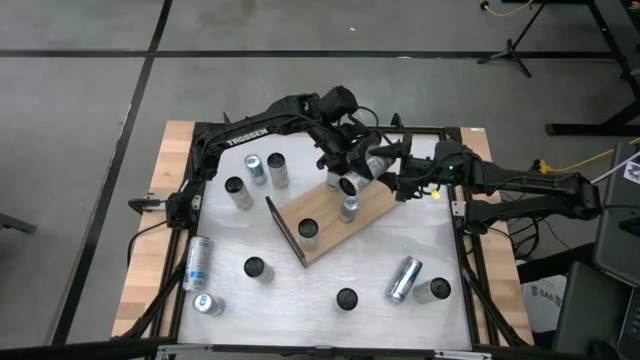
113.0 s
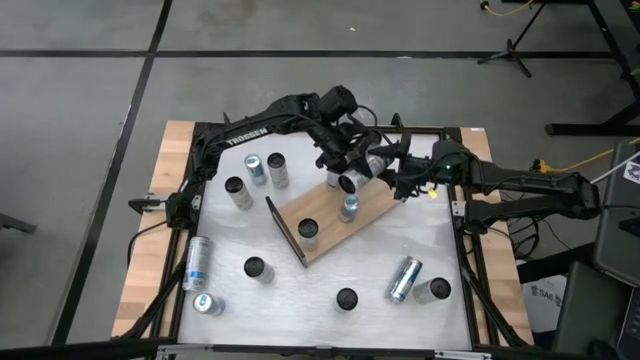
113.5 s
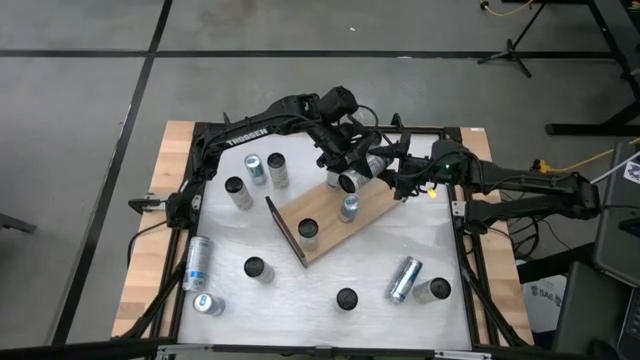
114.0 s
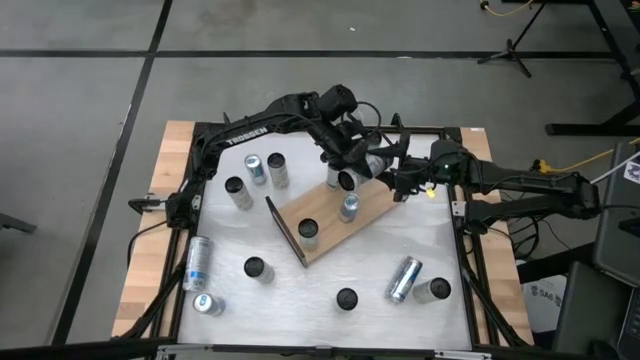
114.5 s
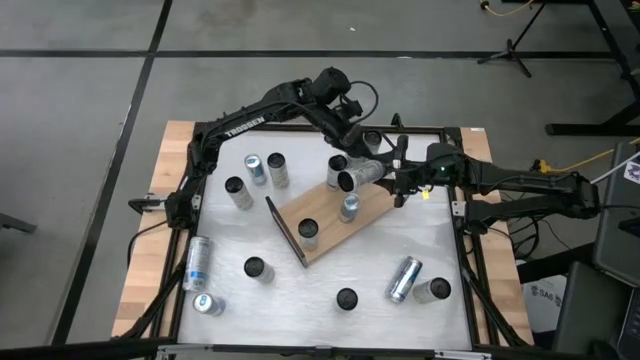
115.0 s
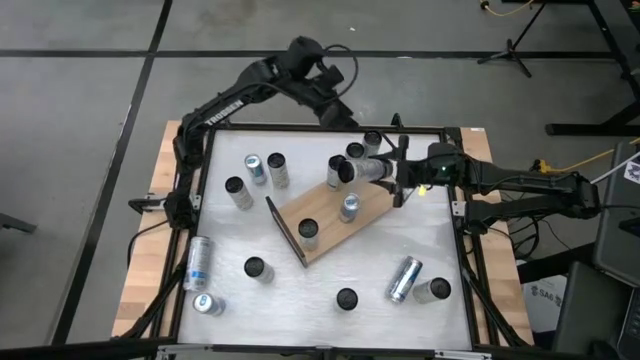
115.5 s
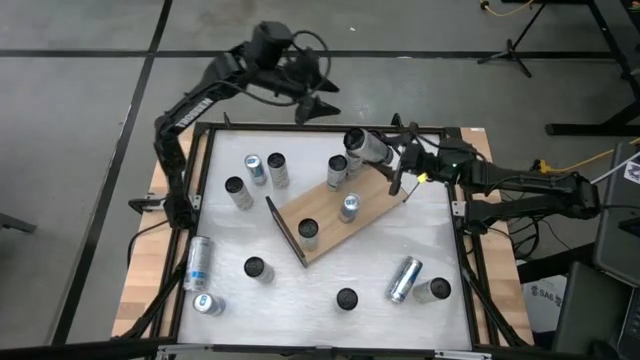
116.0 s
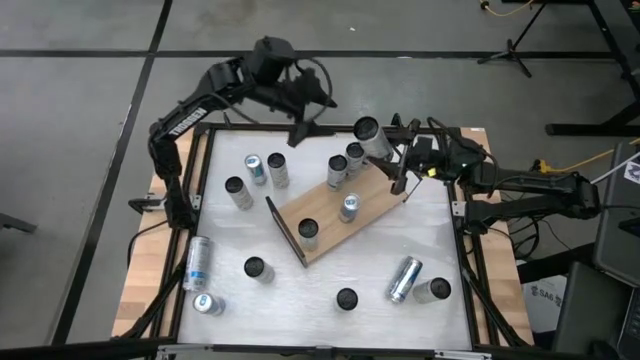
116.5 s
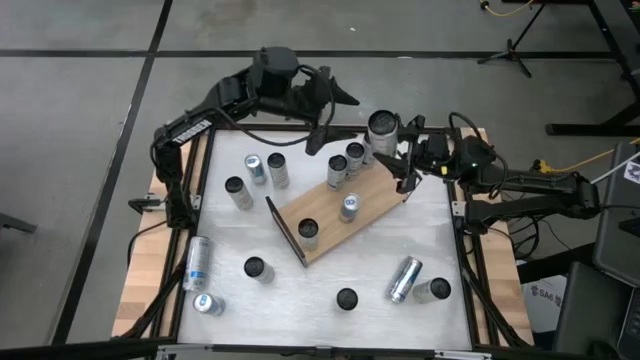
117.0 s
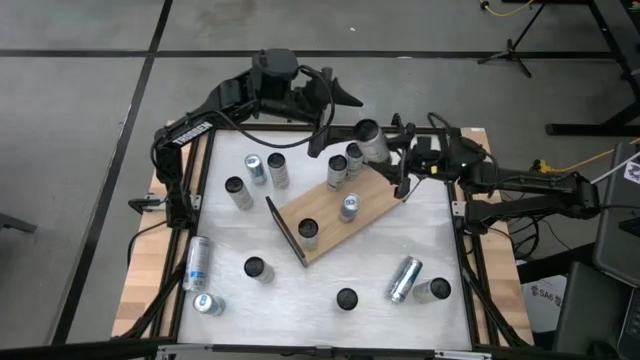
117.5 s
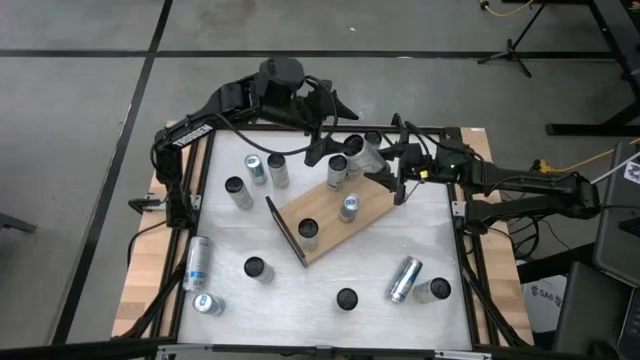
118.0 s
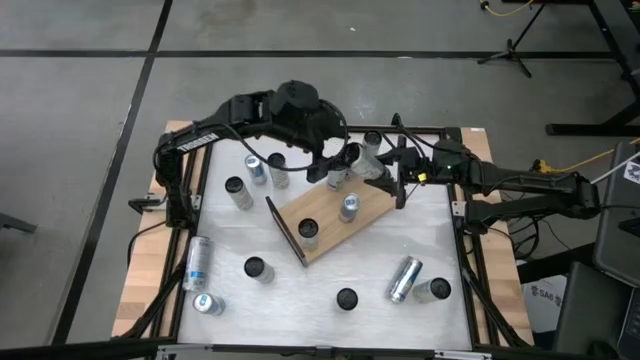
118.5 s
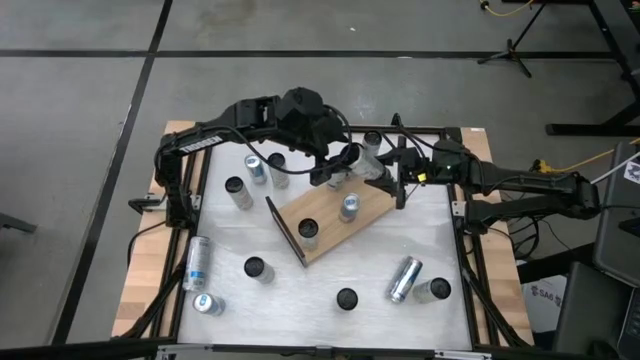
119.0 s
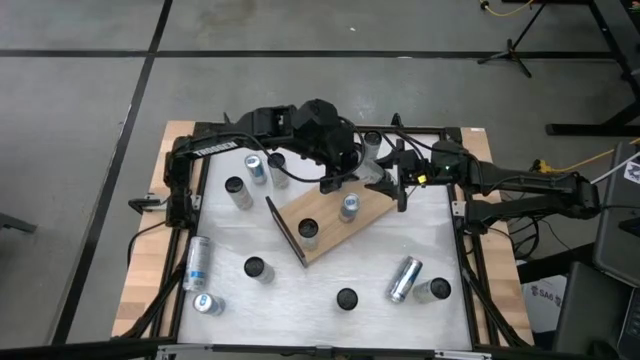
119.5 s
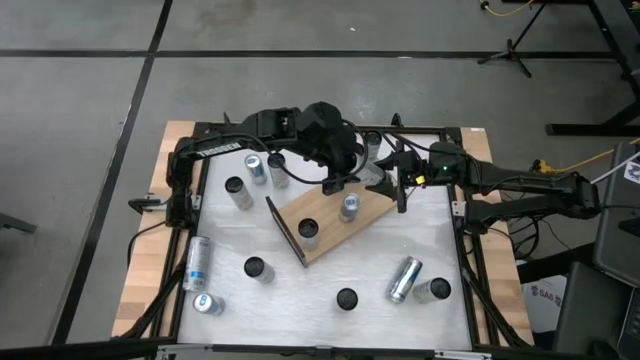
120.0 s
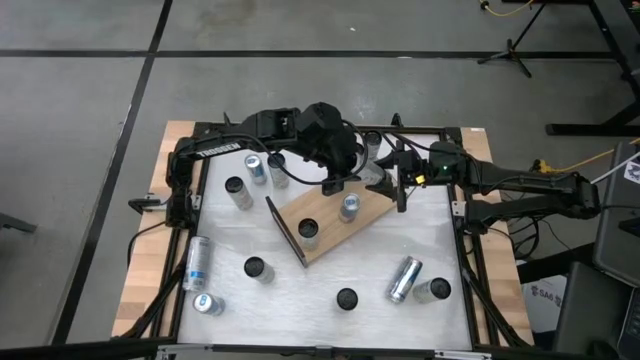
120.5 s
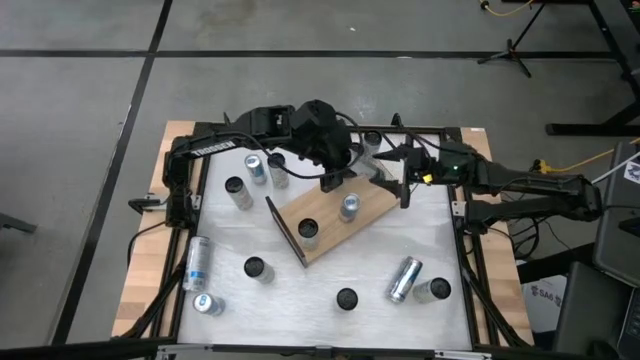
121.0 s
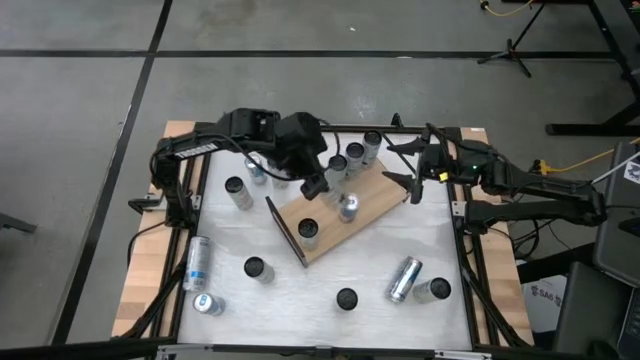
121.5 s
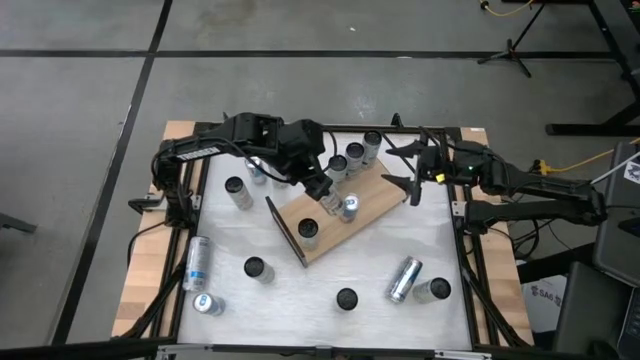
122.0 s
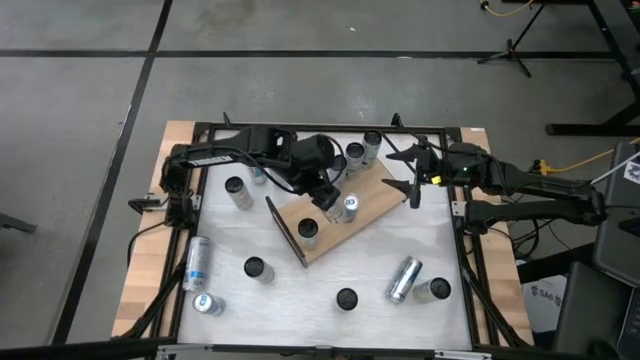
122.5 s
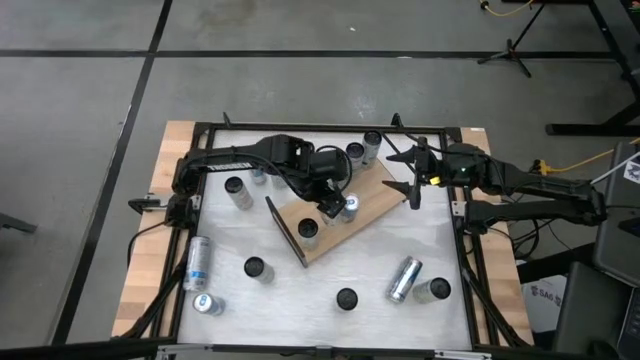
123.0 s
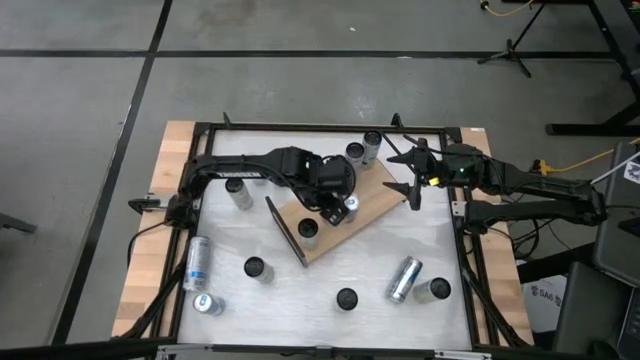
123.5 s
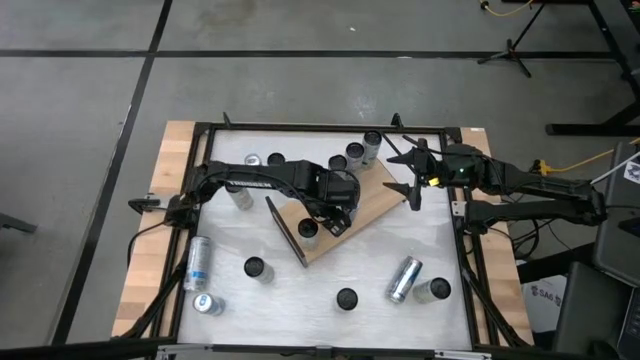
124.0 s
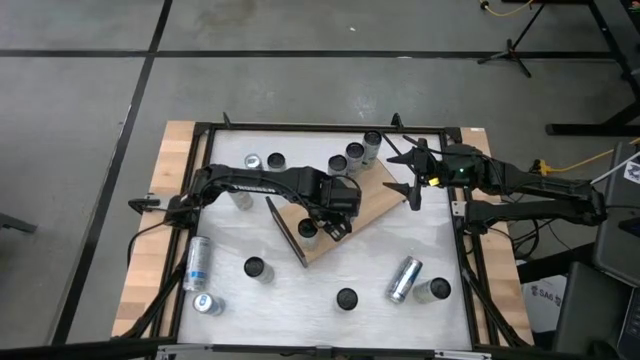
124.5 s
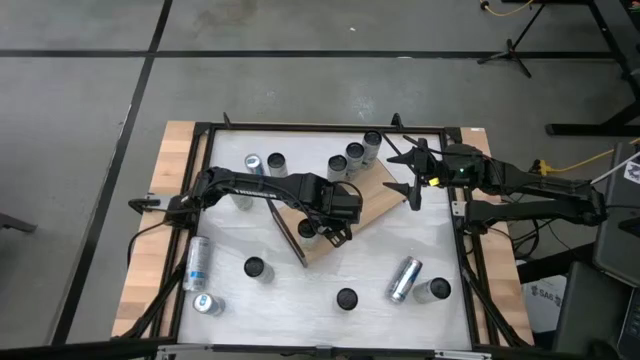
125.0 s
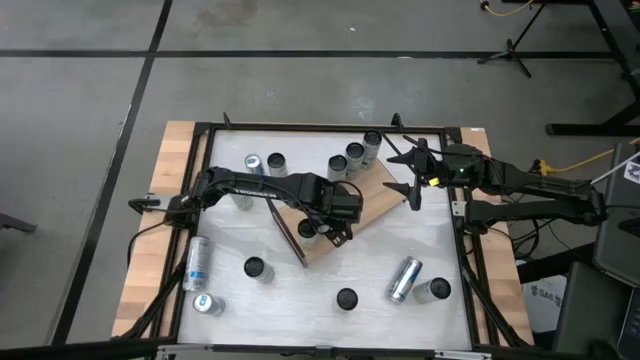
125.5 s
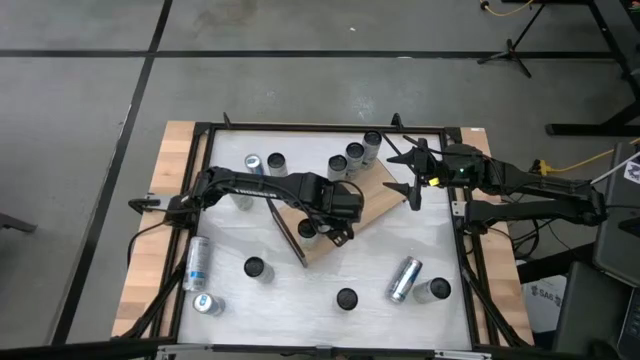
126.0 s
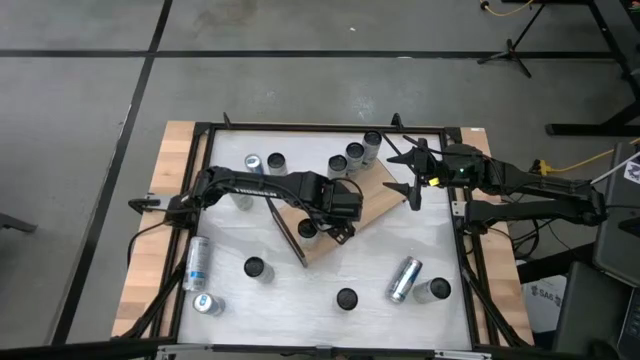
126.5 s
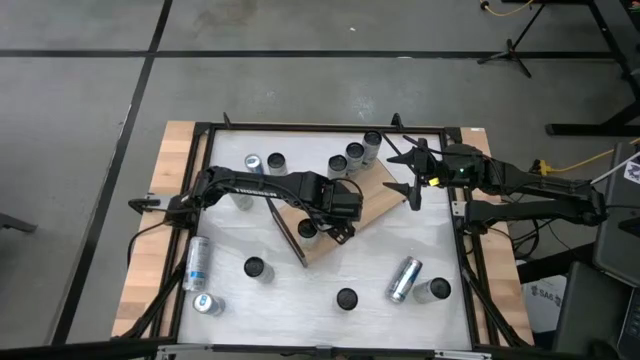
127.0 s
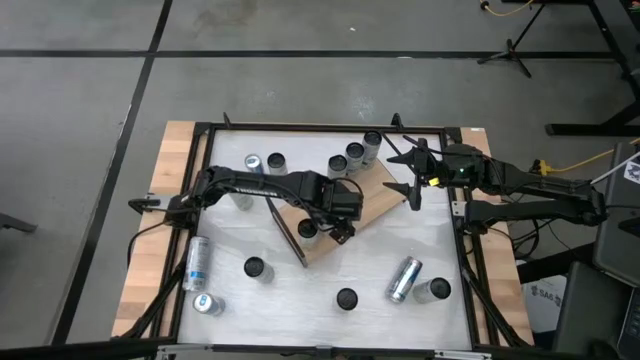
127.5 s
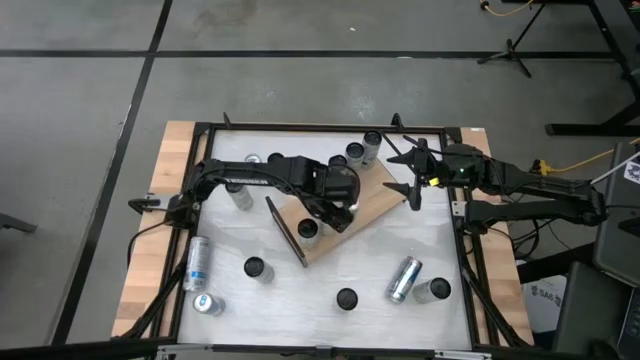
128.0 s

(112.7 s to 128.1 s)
Task: Place canned beverage on shelf
Put the white yellow soda can on the shelf

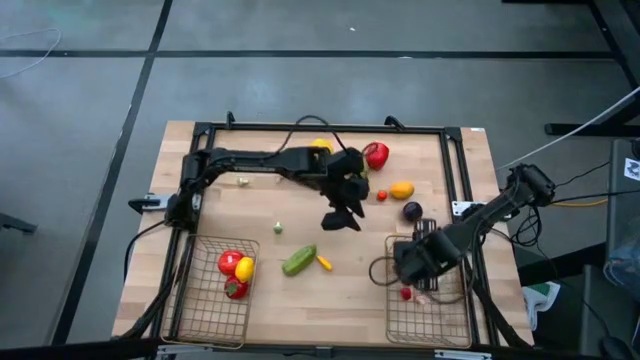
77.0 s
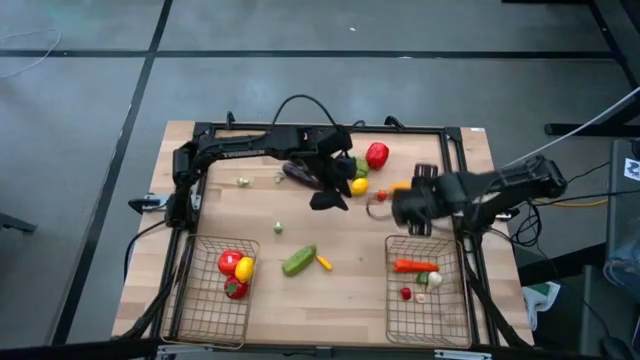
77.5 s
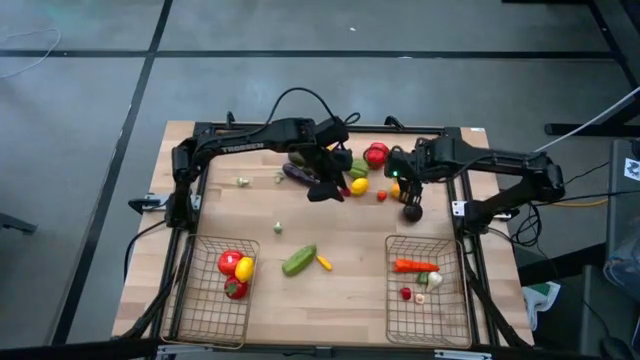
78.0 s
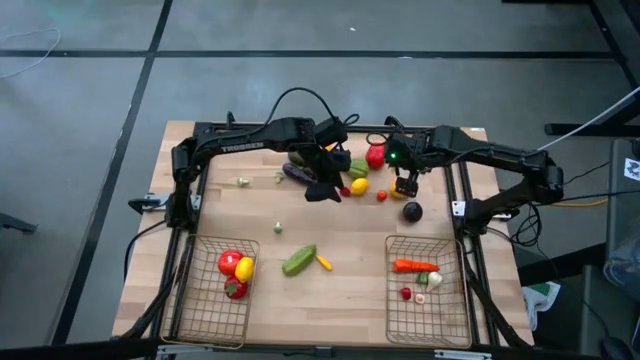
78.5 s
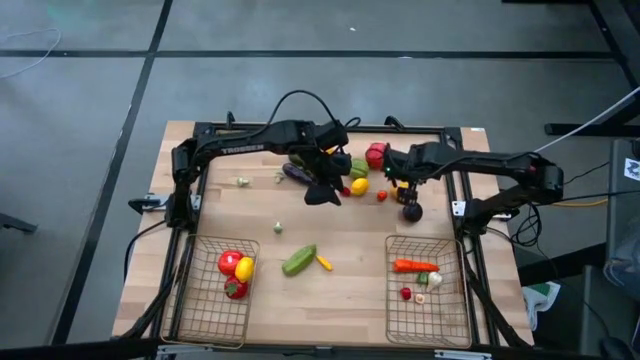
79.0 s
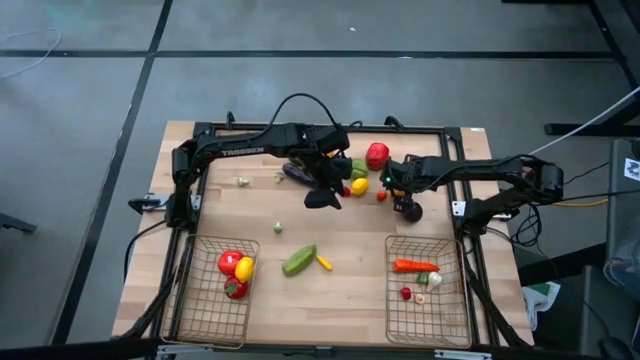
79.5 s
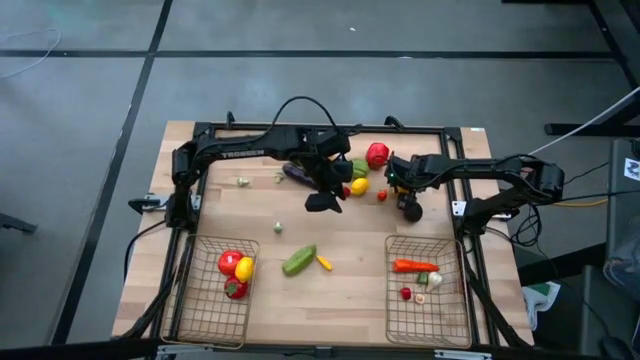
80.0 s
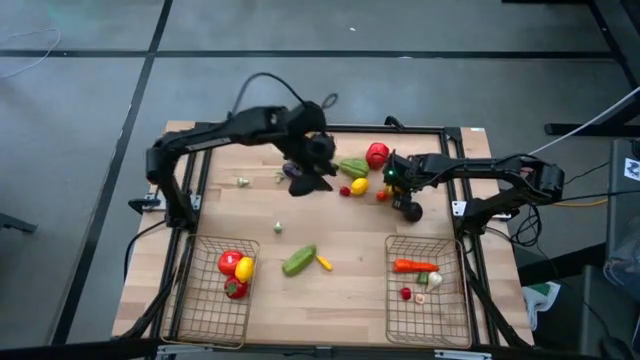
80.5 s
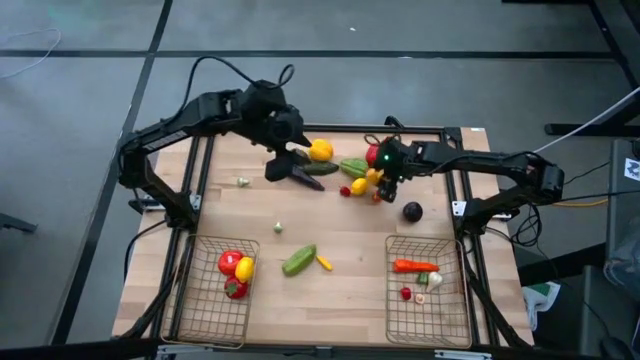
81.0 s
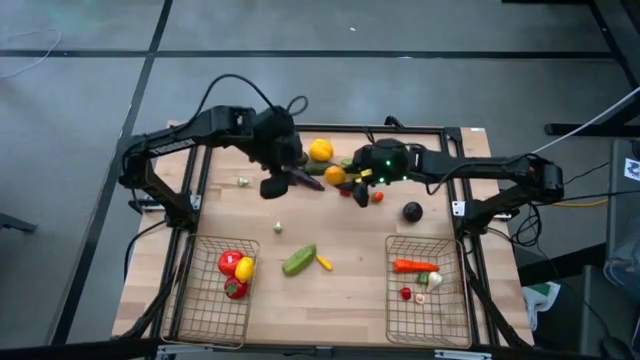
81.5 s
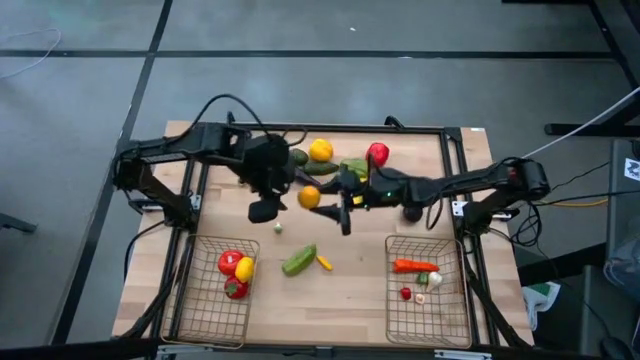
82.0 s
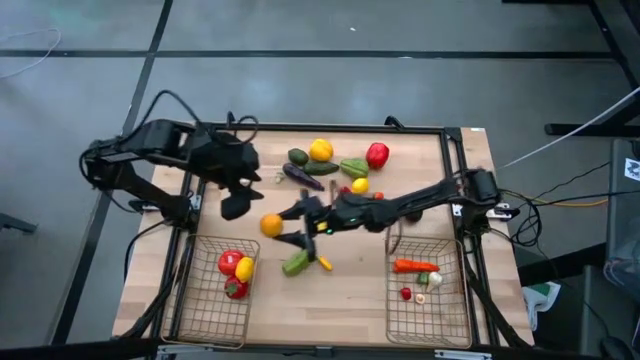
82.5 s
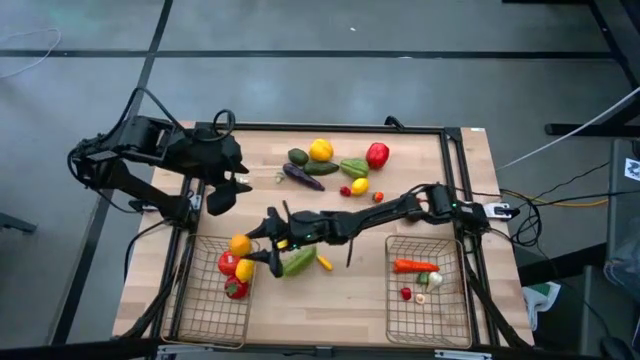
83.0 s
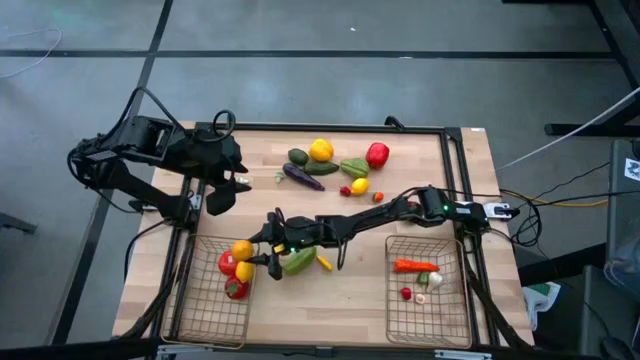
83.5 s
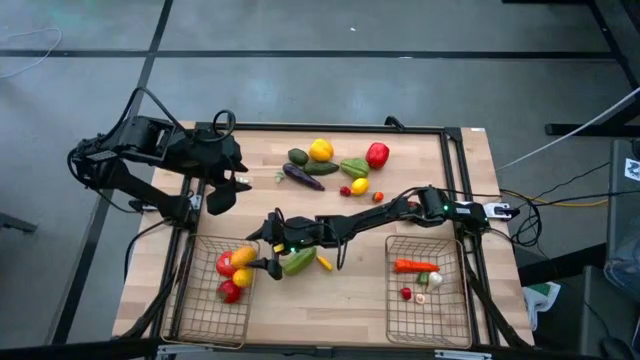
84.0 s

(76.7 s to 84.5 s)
Task: Sort produce into baskets
Put the right lemon into the left wire basket
